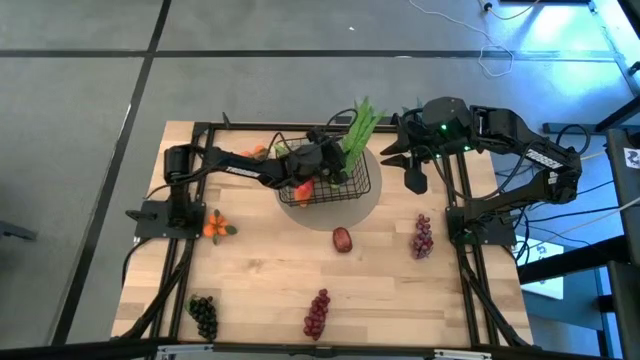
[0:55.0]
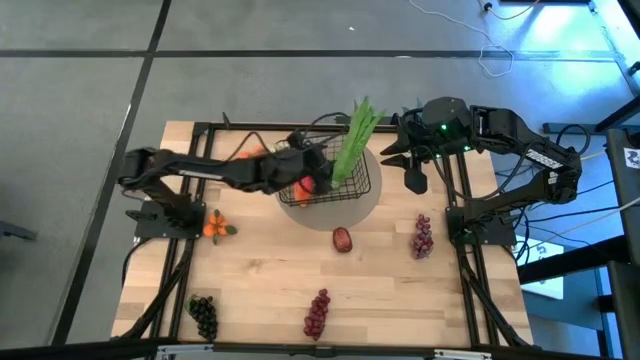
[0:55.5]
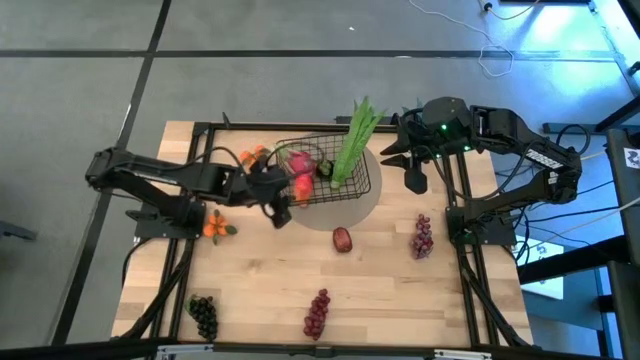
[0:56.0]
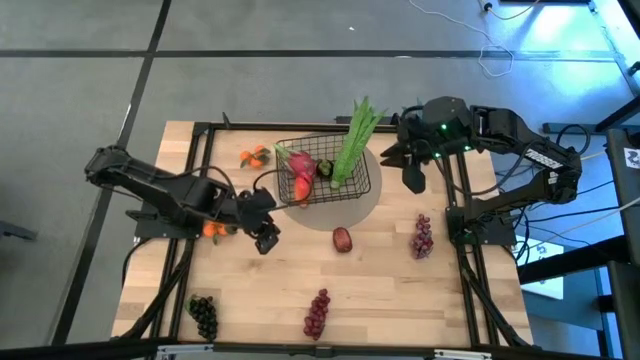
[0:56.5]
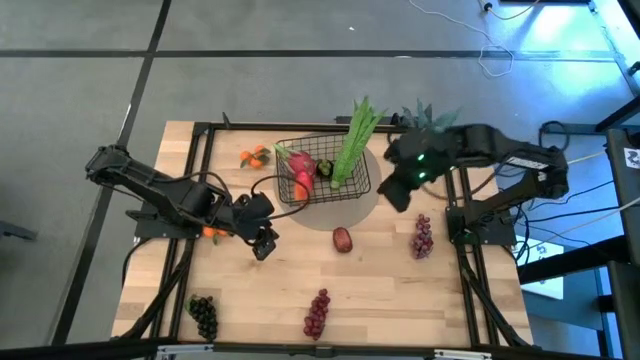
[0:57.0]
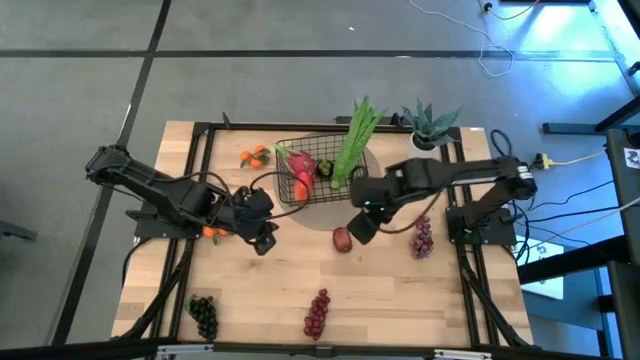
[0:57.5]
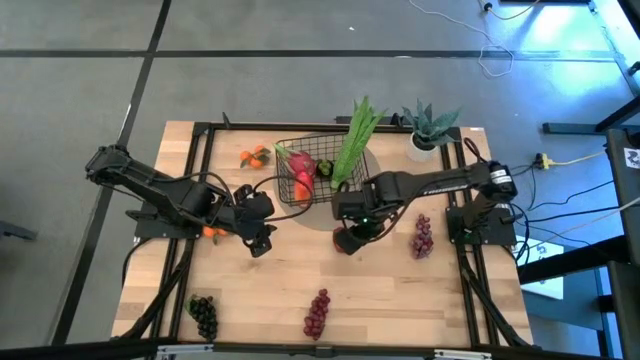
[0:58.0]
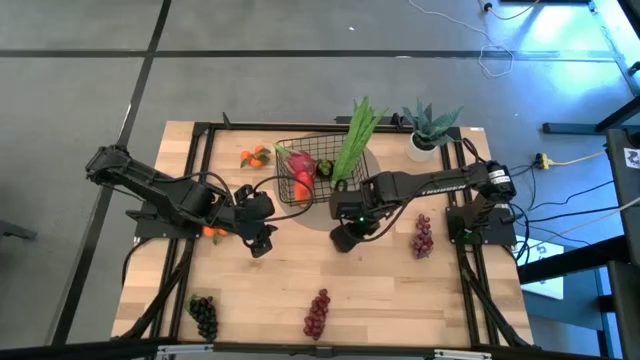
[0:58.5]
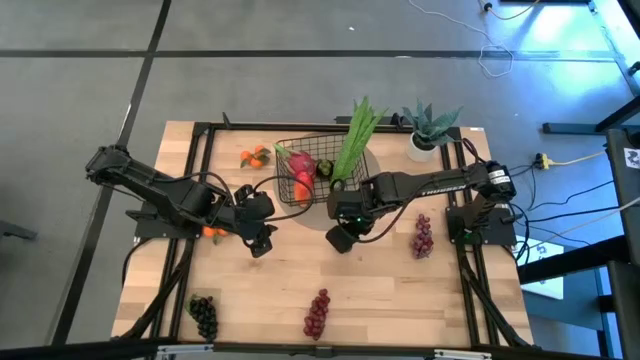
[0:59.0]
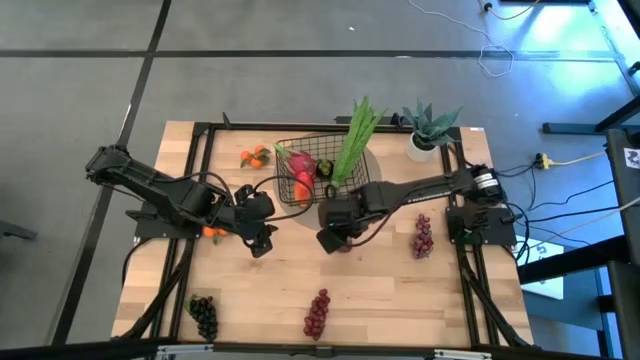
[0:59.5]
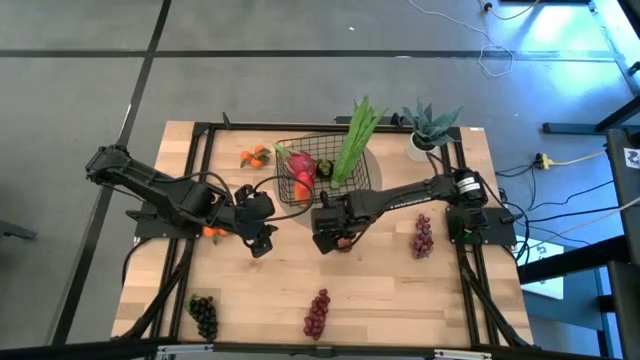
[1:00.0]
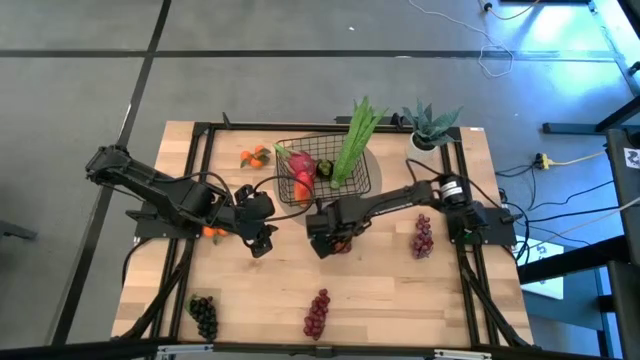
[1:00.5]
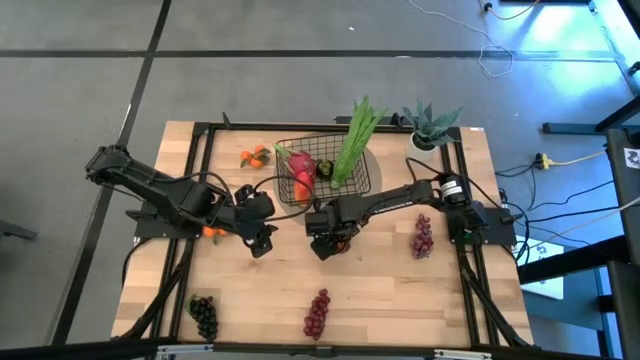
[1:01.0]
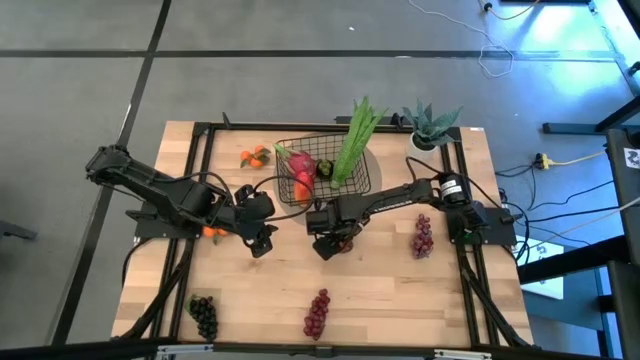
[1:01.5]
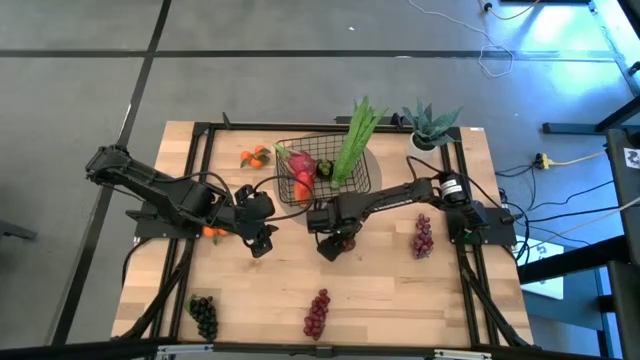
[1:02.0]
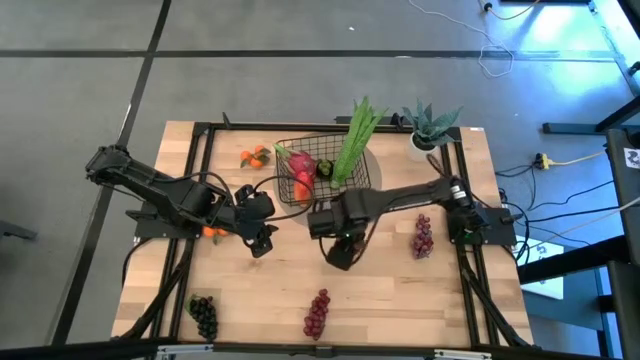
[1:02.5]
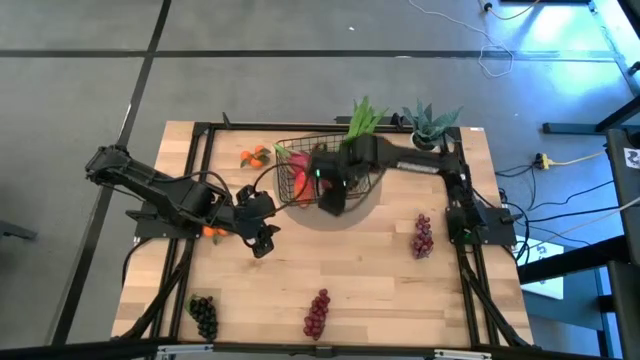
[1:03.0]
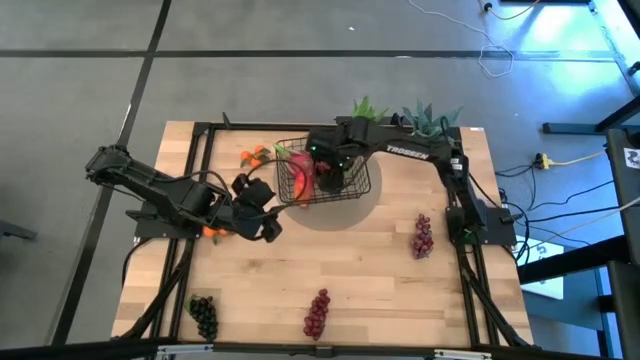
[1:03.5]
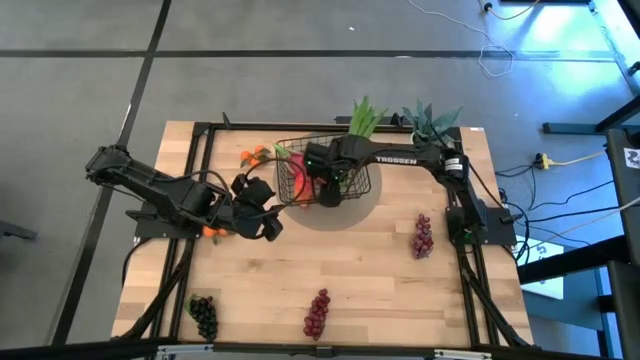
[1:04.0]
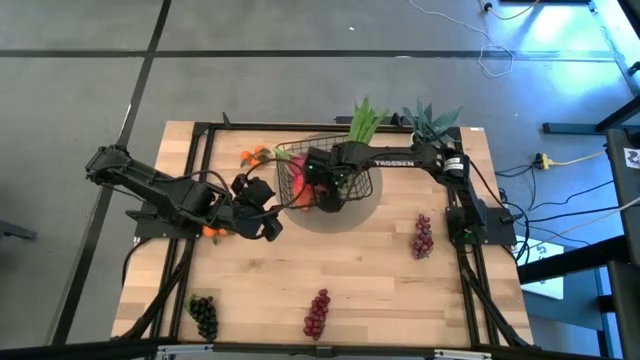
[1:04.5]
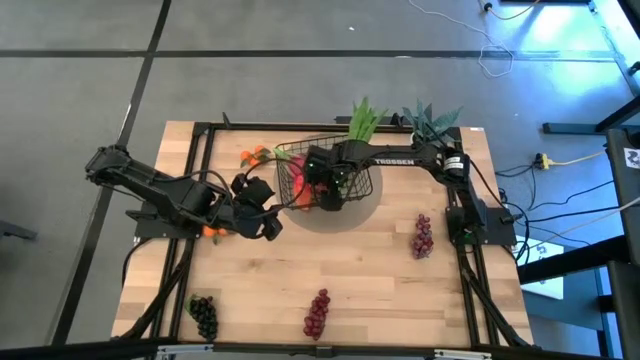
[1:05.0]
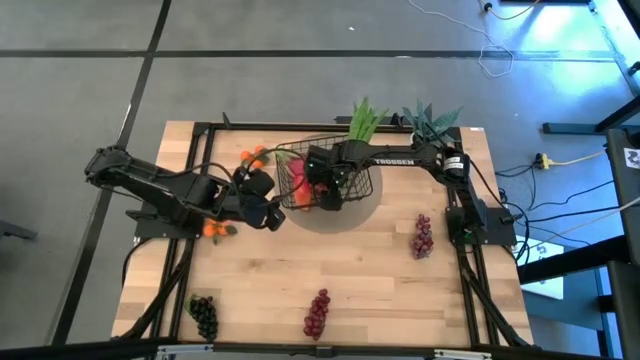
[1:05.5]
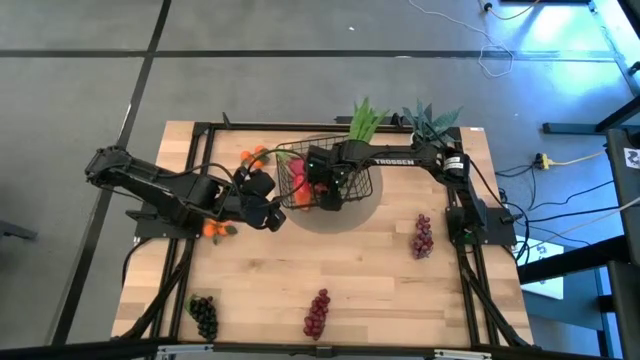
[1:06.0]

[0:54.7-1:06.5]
Task: Build produce basket
Put the apple into the wire basket

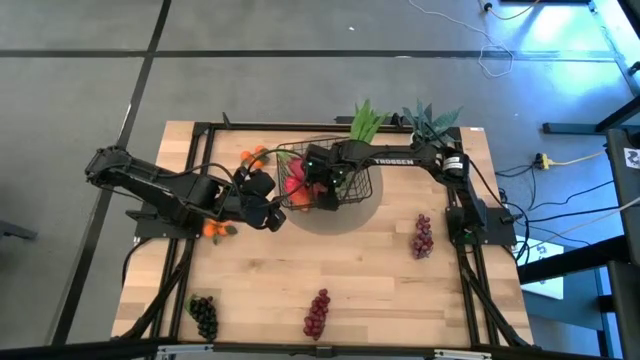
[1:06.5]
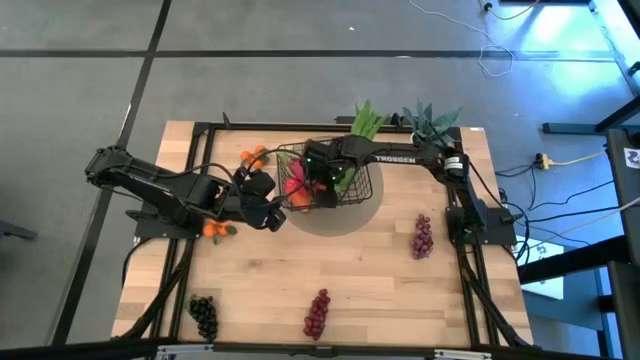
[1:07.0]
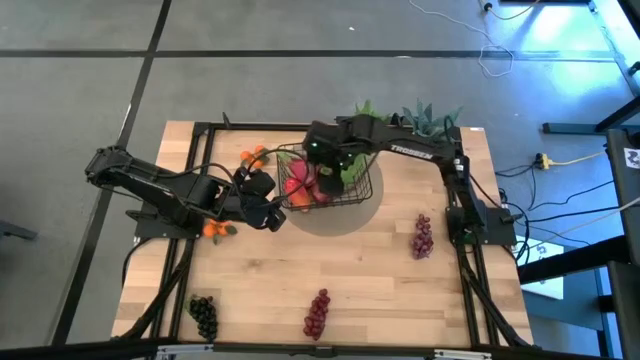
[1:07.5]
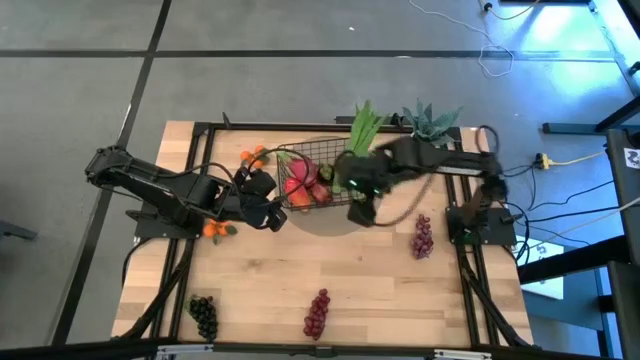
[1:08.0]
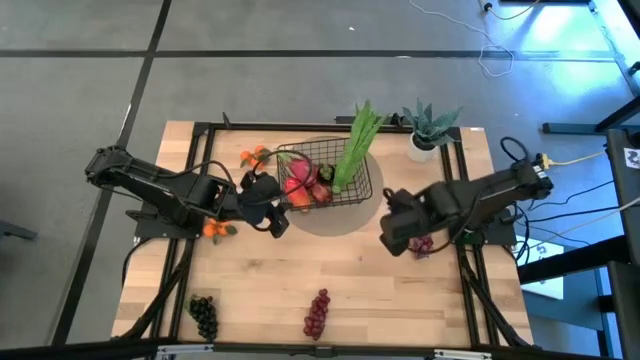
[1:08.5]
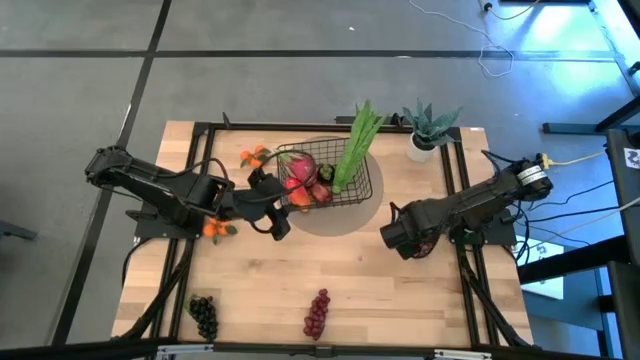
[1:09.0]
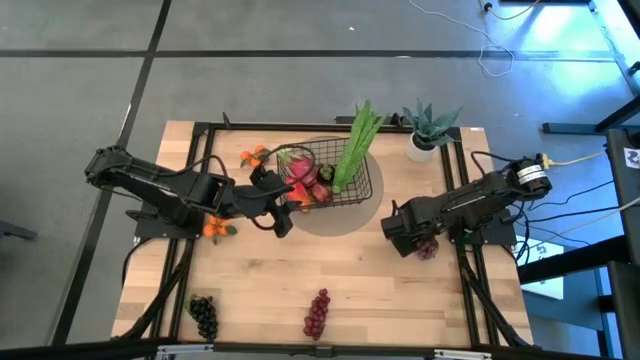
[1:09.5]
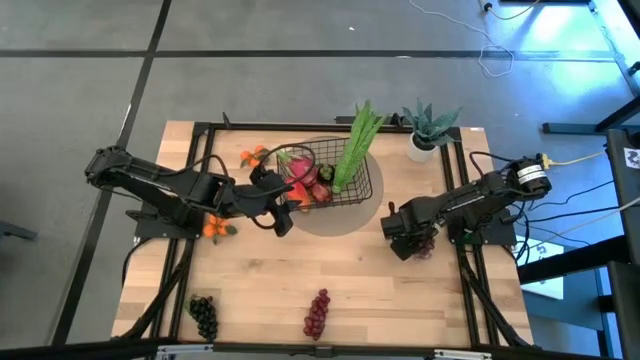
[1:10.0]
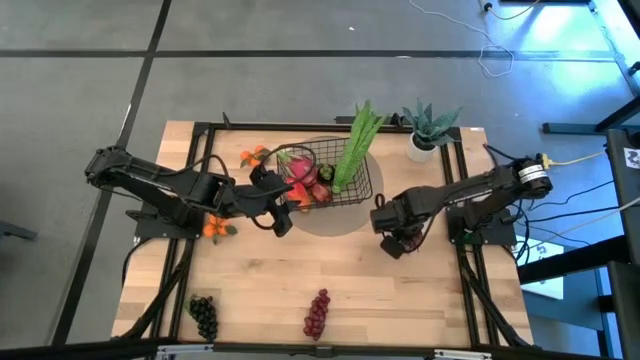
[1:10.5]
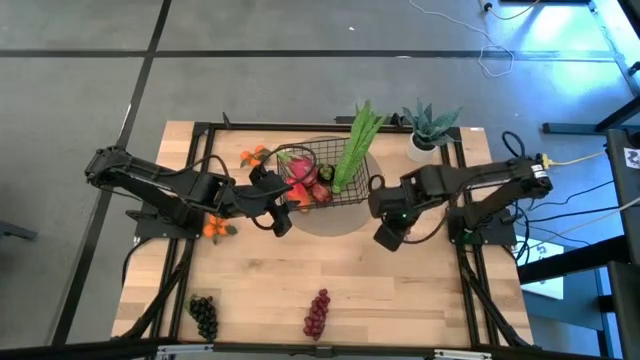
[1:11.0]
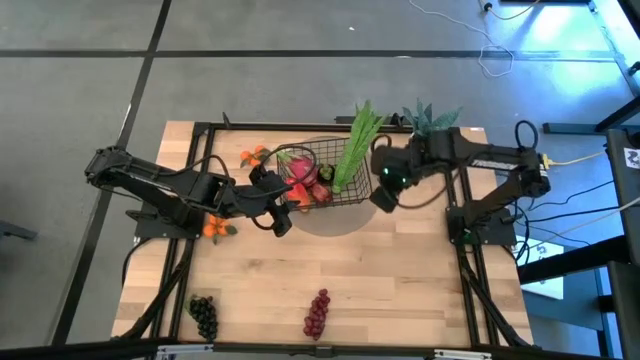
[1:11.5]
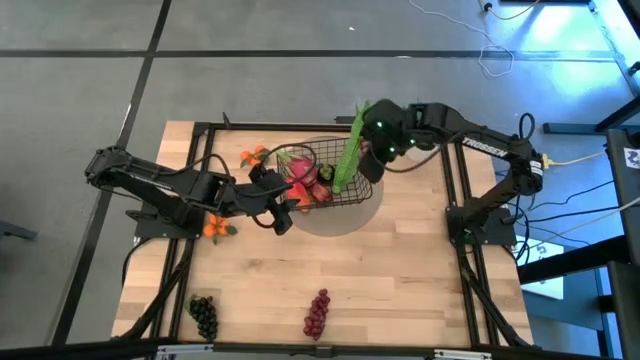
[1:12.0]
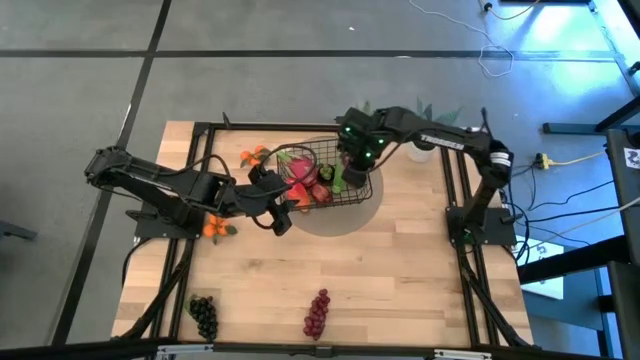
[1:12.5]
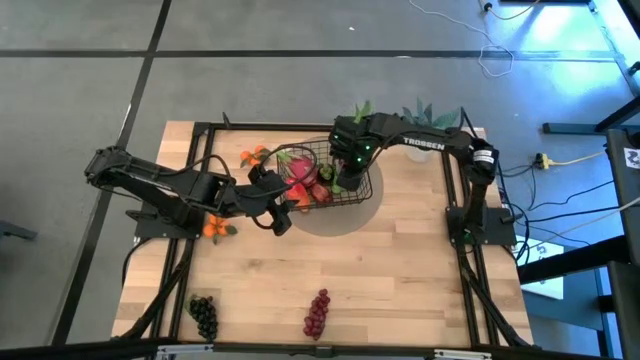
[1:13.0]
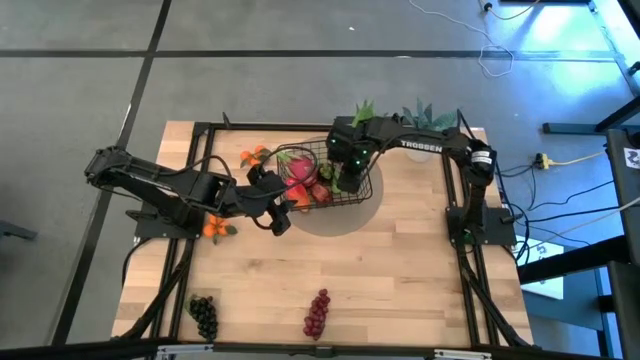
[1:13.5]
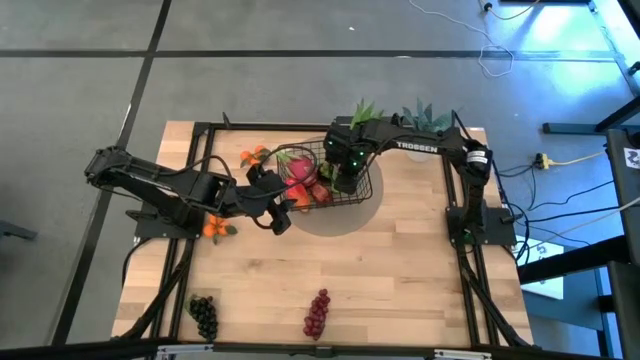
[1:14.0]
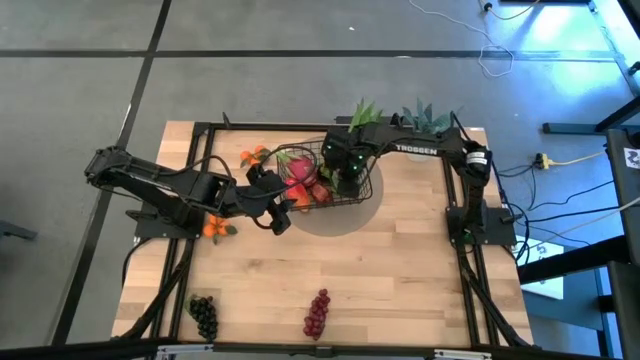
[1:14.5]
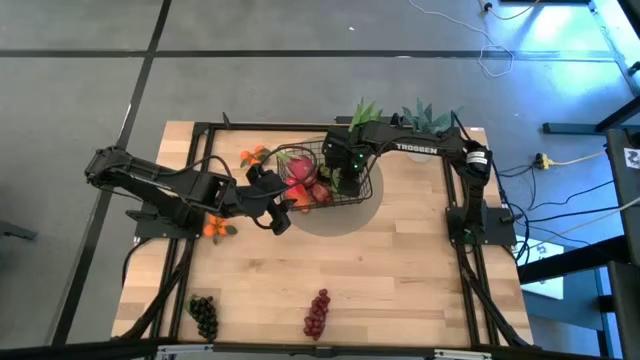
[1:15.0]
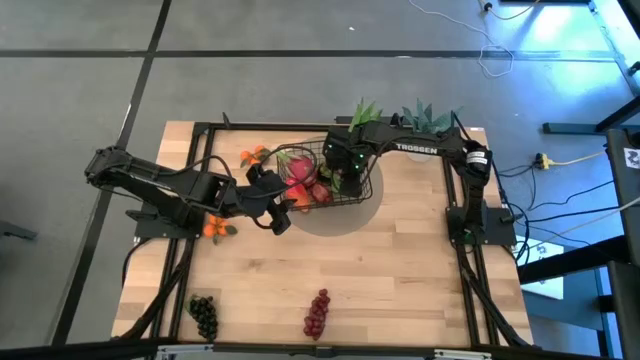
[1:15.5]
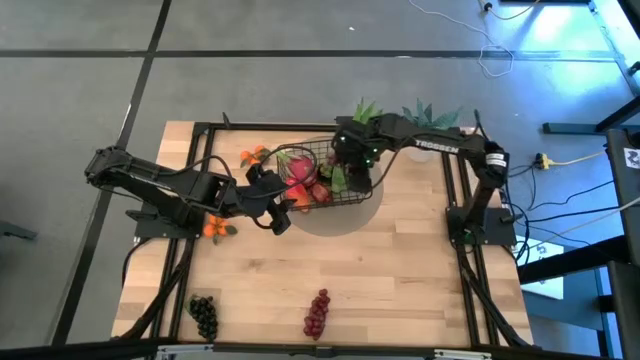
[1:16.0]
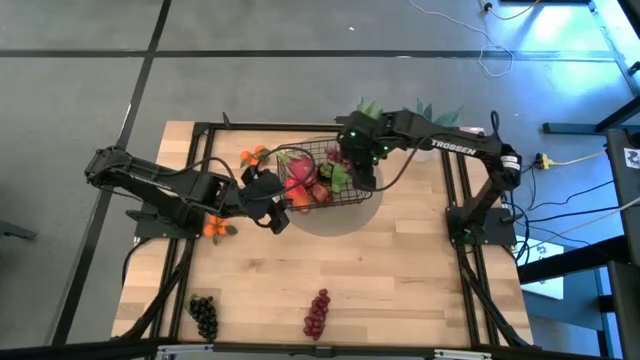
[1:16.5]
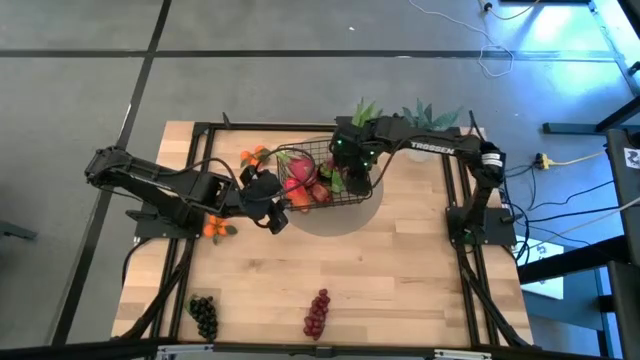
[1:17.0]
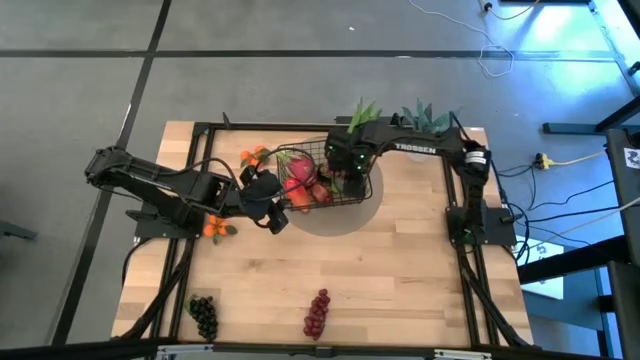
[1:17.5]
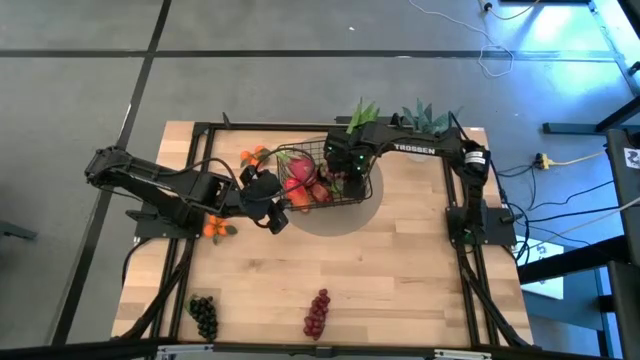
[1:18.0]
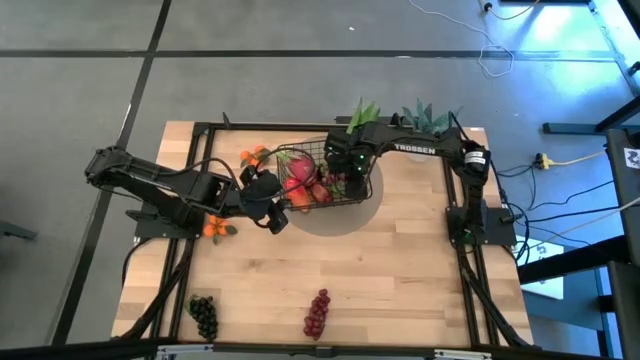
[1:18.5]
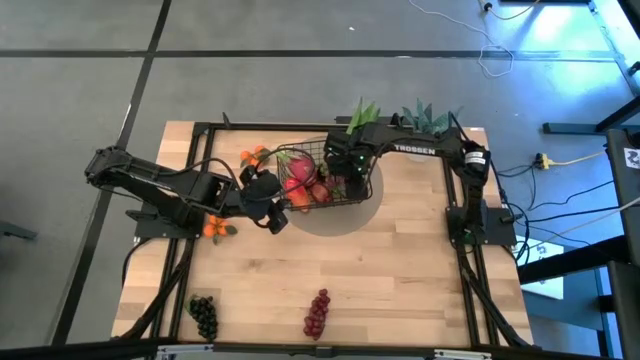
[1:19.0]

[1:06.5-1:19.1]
Put the right red grapes into the wire basket
